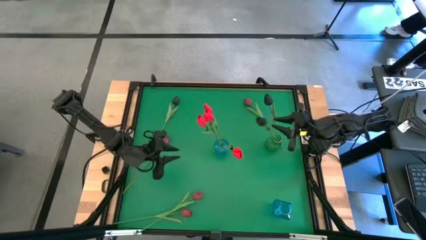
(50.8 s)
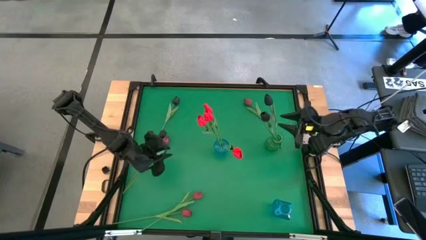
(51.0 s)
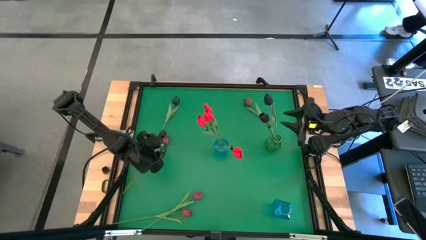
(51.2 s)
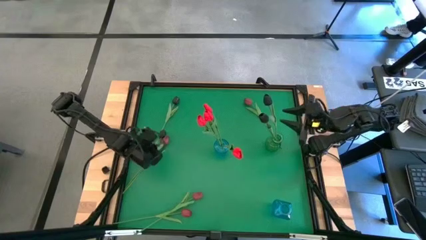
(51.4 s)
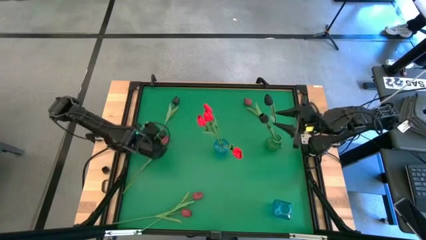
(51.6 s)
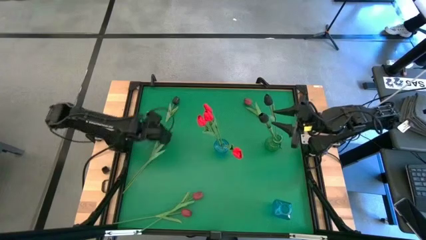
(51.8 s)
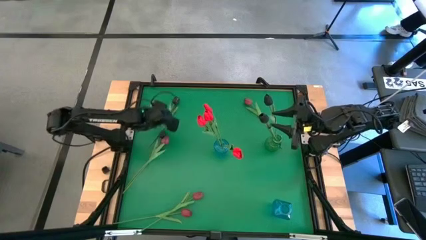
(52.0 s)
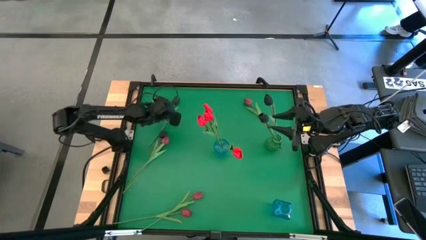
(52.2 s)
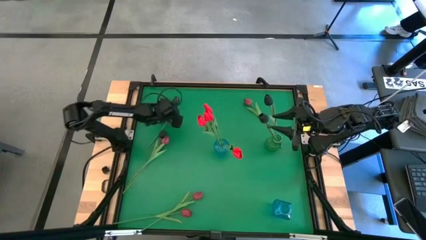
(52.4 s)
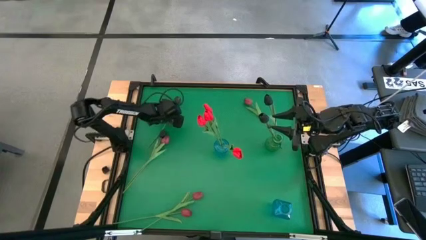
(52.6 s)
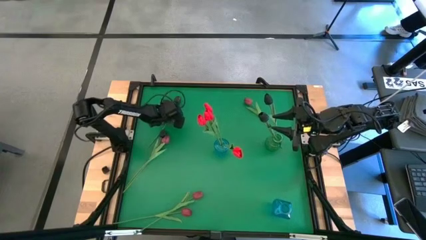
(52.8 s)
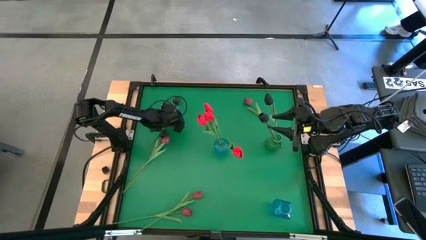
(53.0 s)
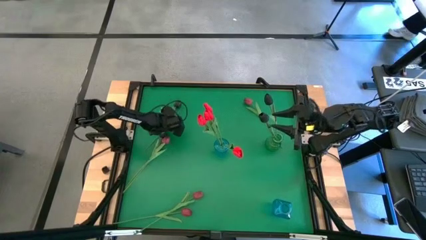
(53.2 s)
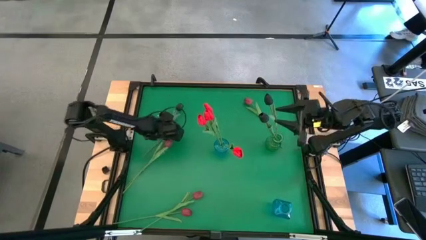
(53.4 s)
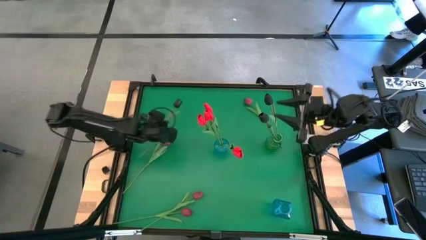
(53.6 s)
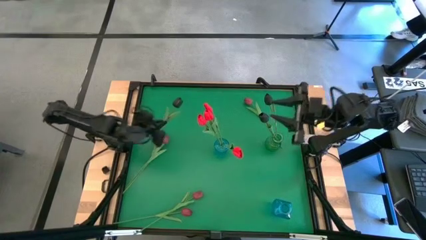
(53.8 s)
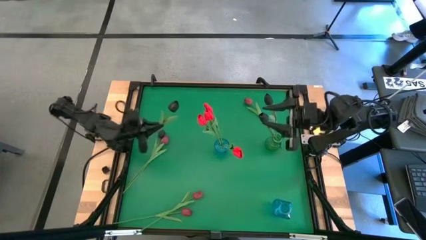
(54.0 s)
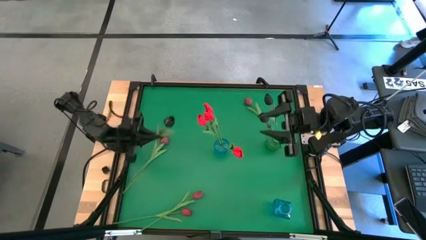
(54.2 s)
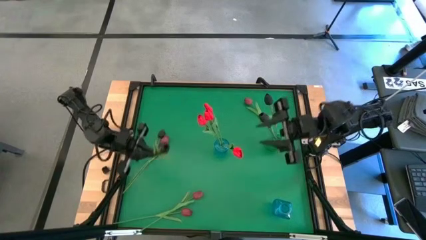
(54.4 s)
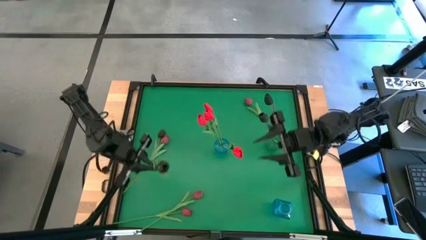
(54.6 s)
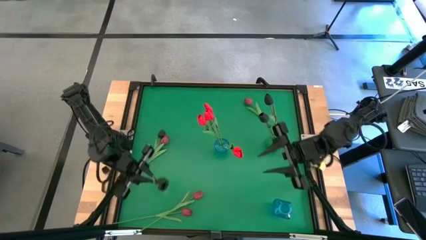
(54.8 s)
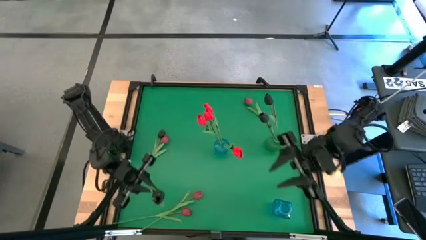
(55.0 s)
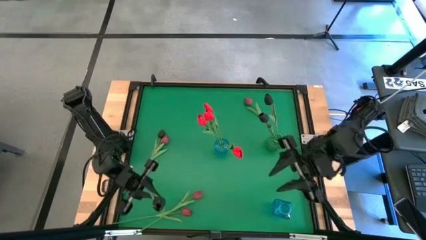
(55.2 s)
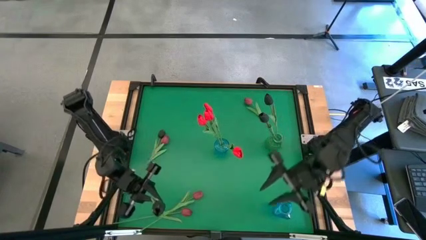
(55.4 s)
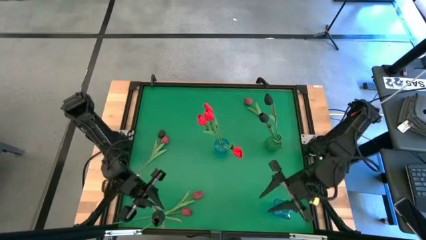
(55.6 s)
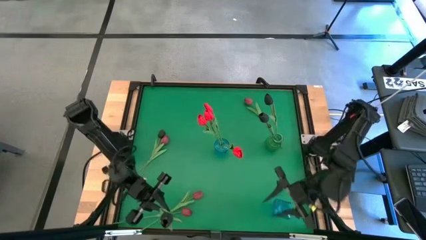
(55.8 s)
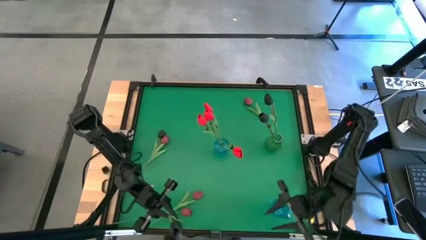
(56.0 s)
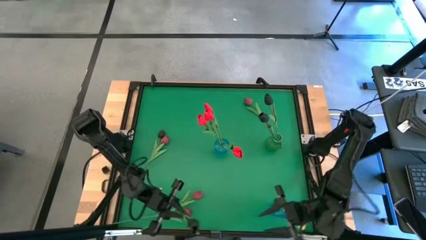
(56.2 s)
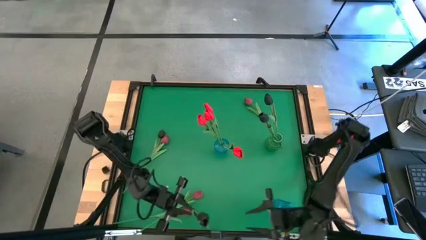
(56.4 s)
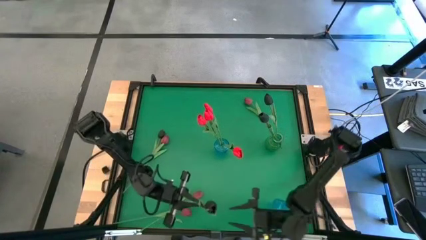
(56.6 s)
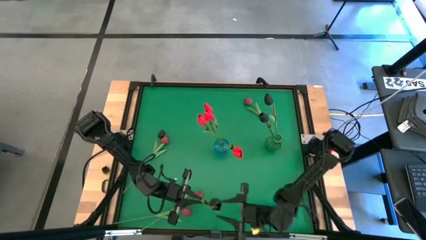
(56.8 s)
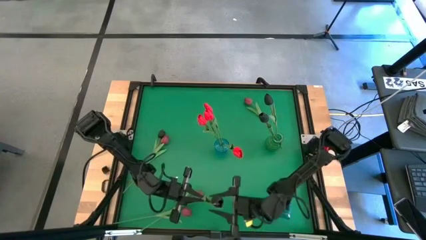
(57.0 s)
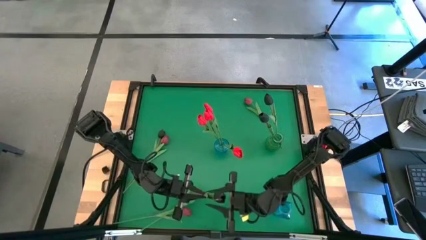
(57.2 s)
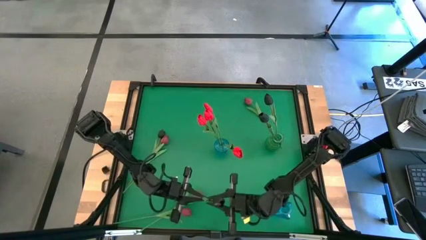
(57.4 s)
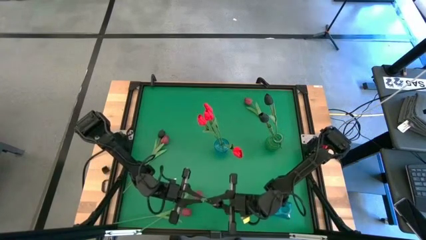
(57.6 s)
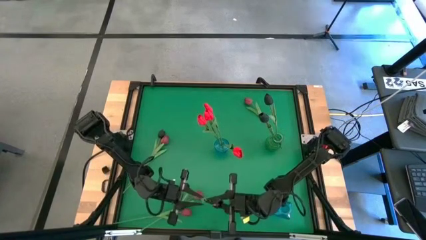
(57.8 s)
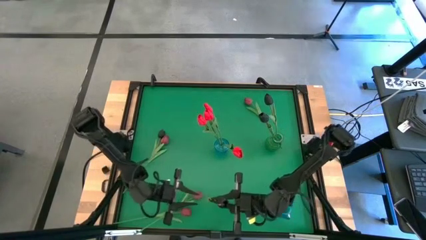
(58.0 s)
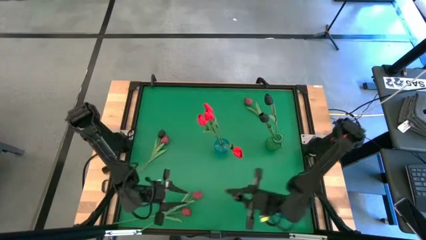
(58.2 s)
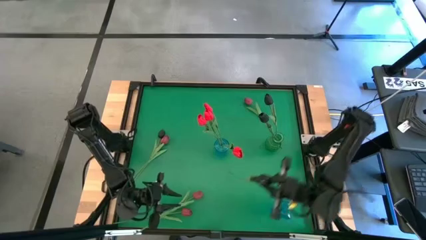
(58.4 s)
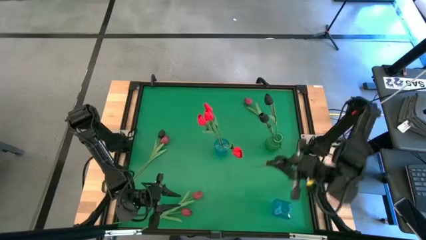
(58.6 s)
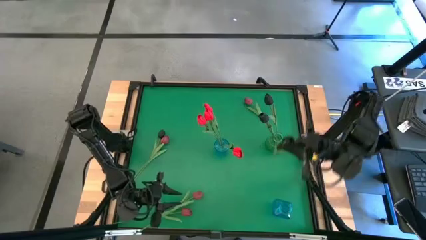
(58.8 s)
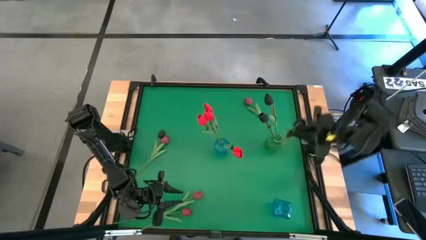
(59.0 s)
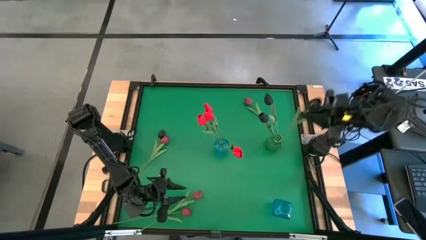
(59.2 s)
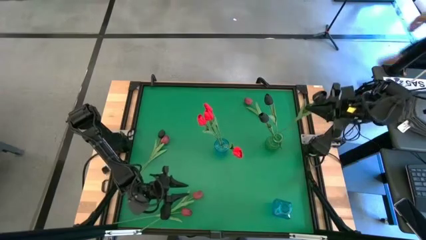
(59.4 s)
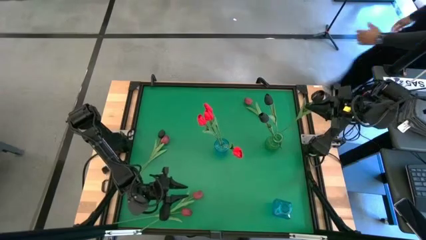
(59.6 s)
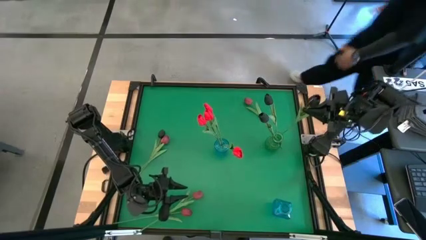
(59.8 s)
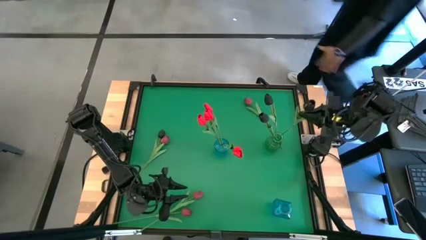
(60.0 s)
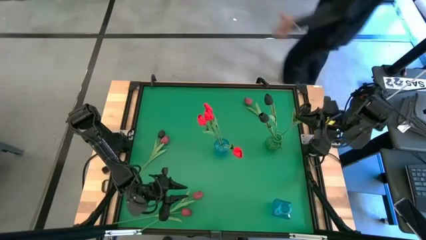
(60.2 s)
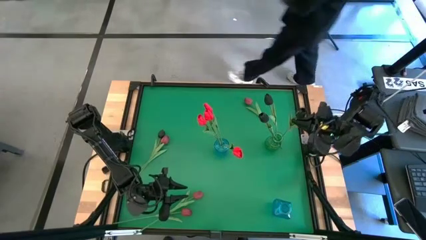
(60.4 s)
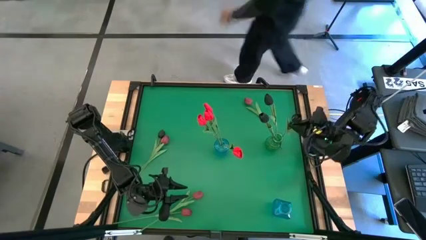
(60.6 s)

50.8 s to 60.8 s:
Task: Sort flowers into vase by color
Put the black flower in the green vase

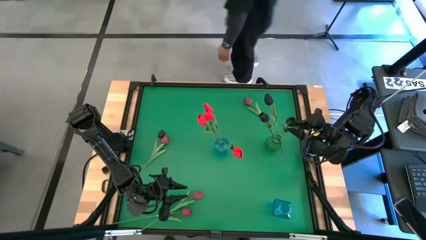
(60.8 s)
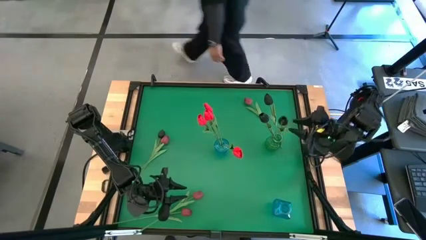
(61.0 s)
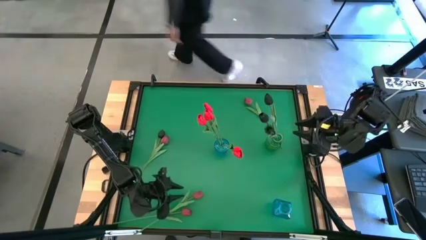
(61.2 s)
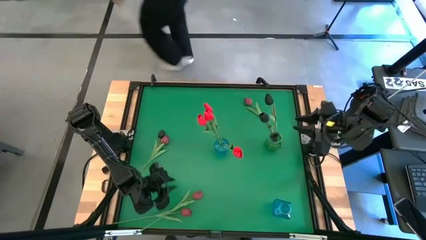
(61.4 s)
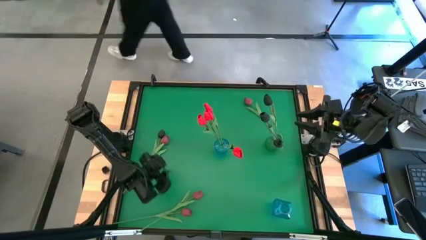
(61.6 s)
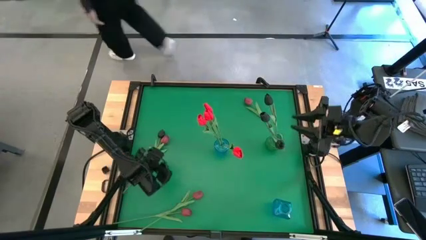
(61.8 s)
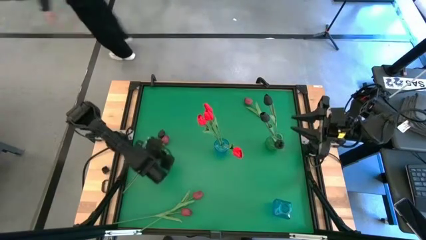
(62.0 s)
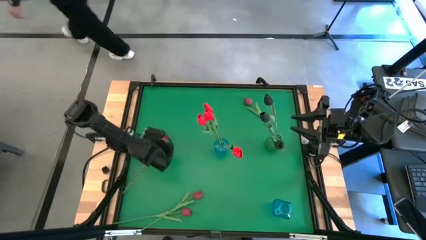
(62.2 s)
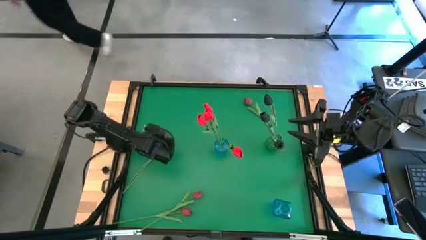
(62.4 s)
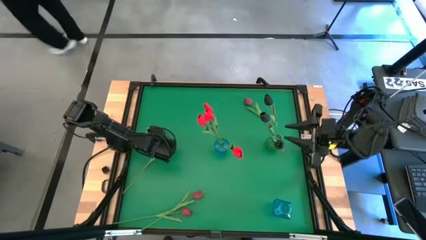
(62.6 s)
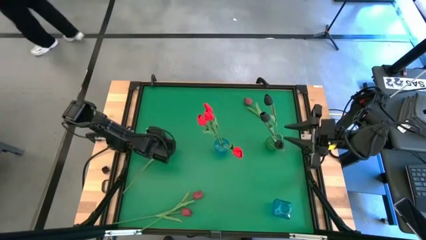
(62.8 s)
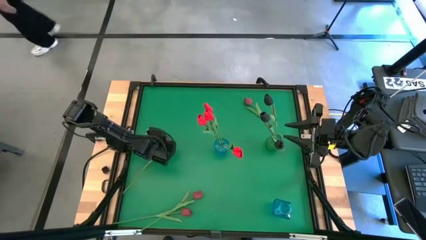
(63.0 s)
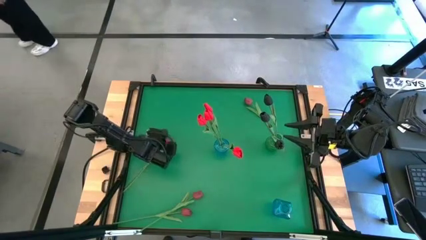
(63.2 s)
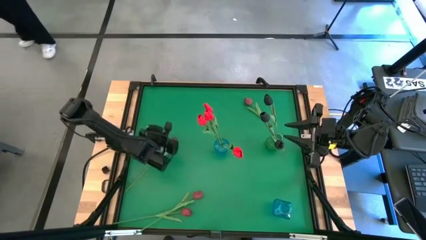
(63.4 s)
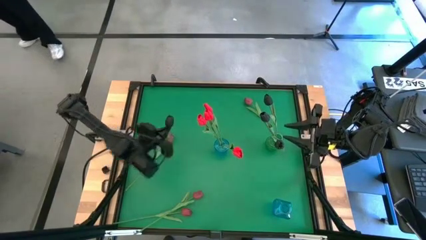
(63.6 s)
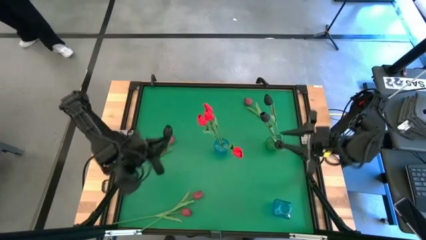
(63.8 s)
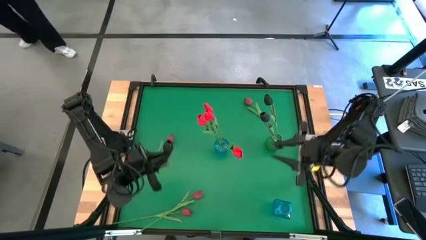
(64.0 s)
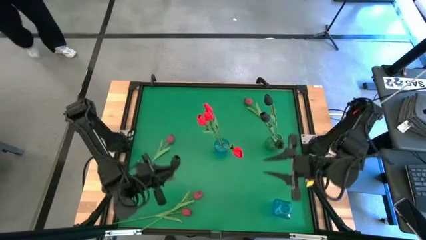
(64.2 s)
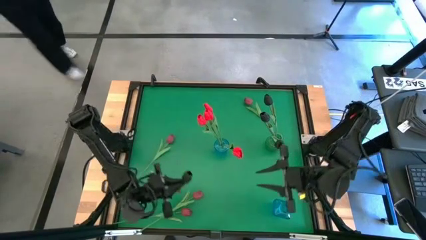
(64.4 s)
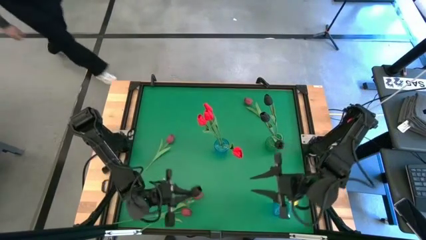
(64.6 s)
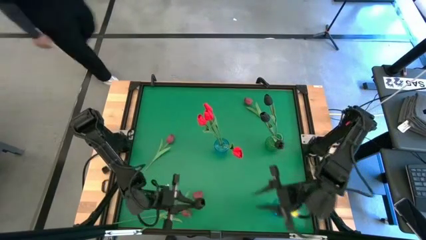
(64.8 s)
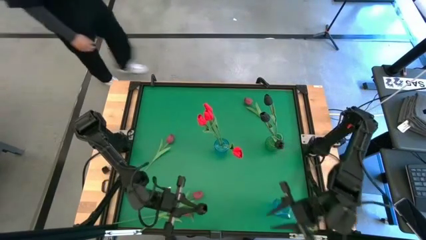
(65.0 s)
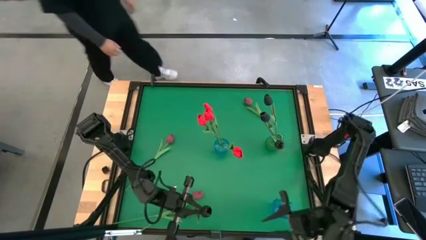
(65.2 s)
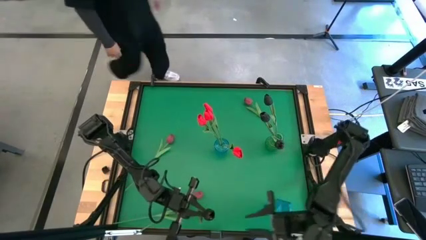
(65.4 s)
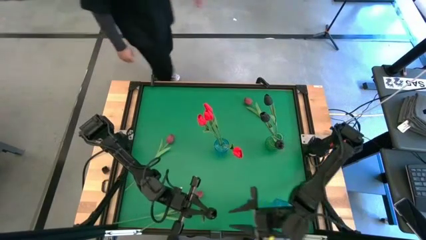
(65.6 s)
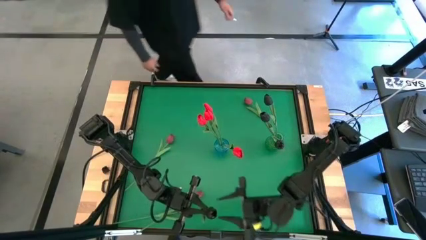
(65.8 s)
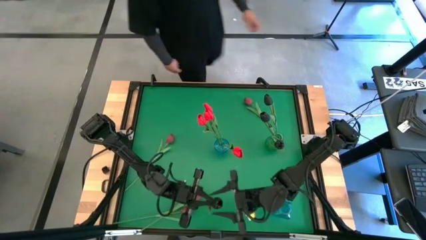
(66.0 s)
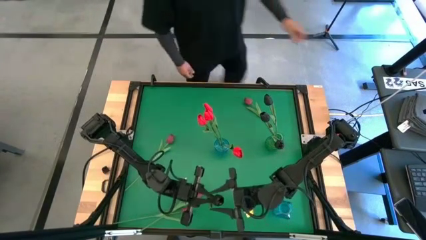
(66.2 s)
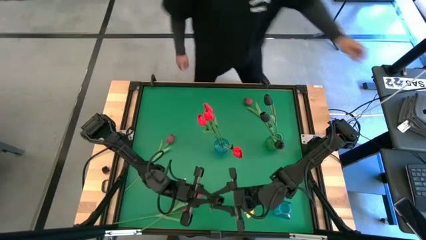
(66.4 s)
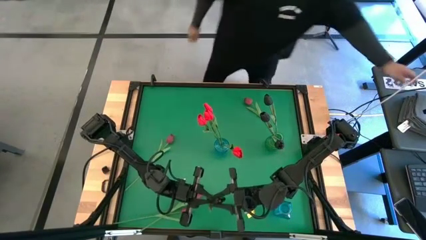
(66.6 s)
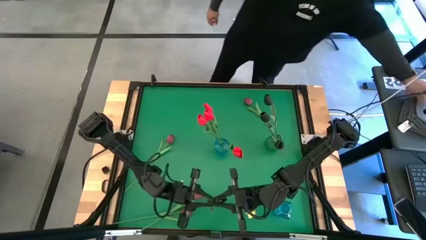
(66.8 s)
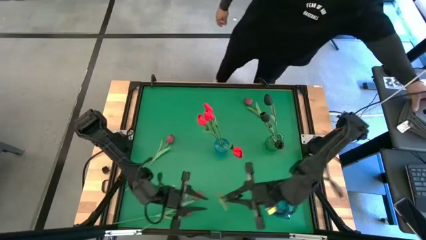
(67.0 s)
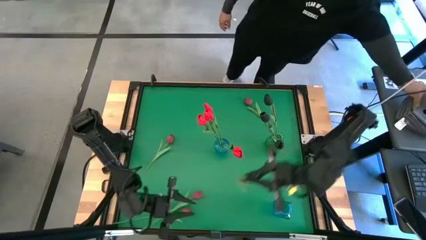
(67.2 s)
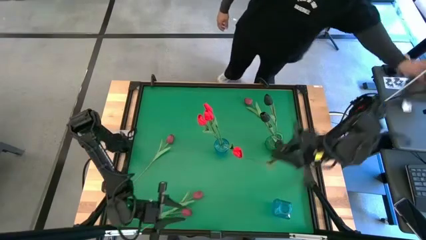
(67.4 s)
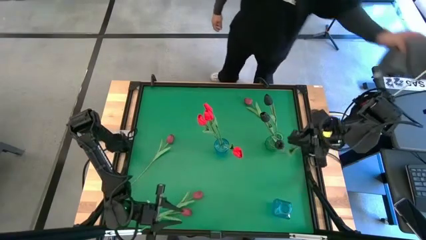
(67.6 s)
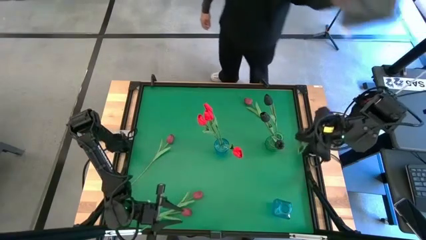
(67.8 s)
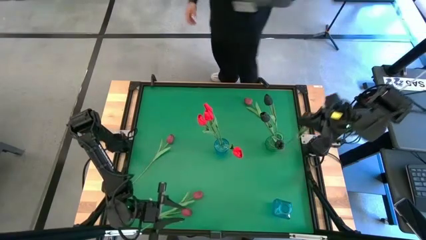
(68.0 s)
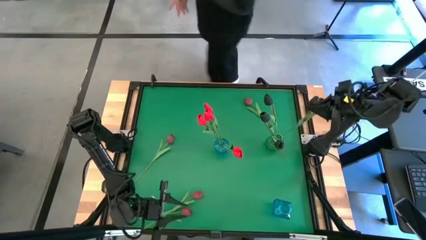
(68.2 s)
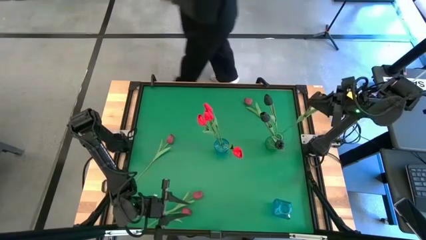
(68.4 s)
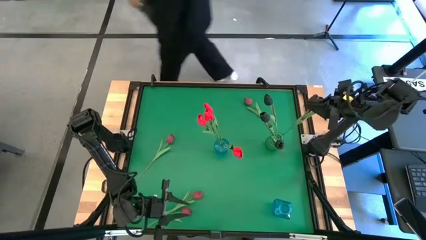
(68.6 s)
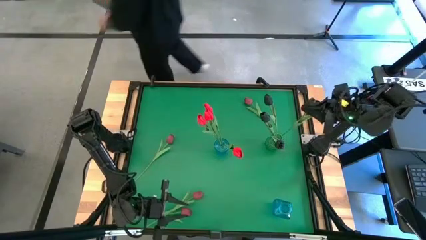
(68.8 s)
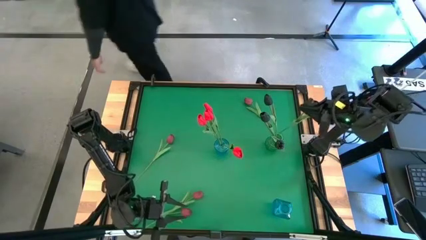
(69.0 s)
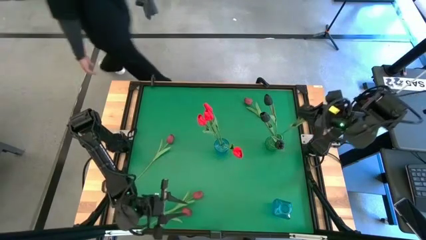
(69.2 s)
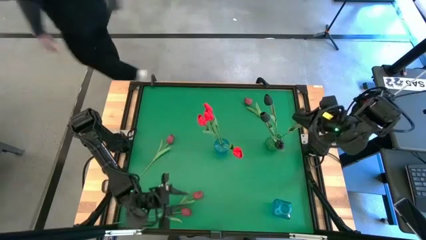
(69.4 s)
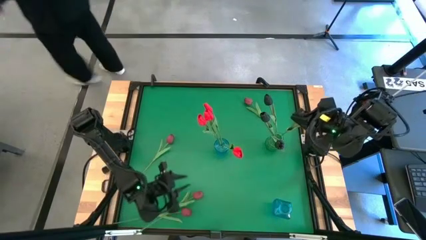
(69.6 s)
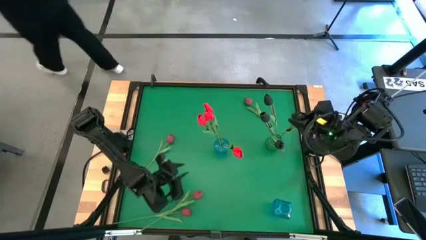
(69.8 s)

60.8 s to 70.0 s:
Put the black flower in the green vase
